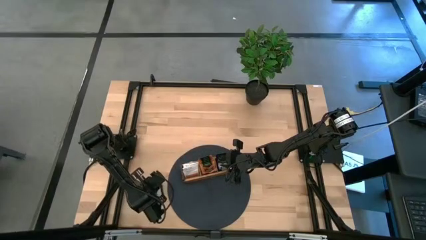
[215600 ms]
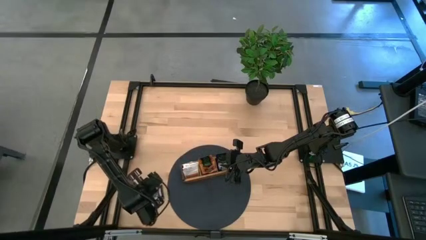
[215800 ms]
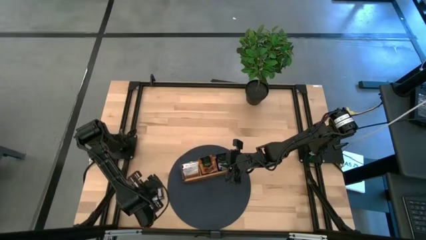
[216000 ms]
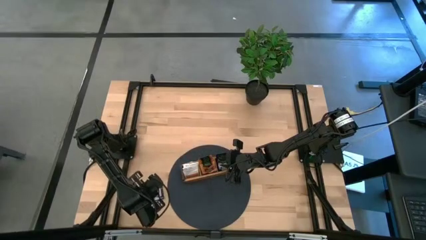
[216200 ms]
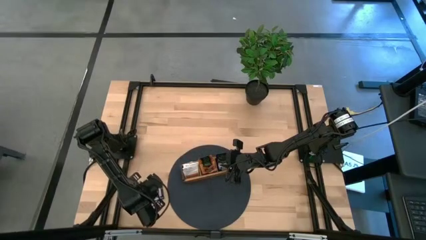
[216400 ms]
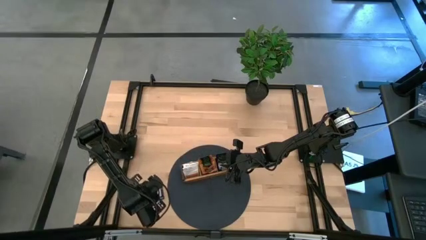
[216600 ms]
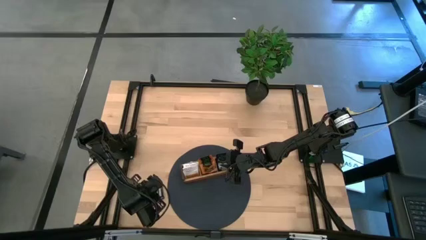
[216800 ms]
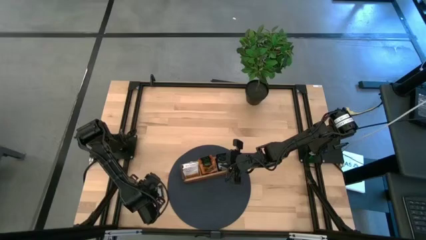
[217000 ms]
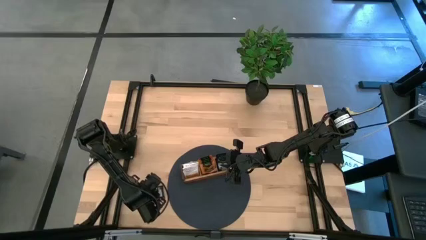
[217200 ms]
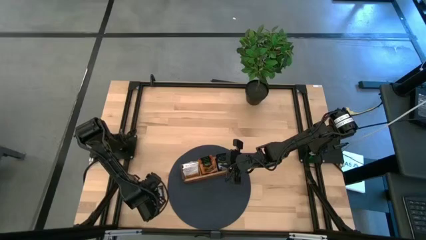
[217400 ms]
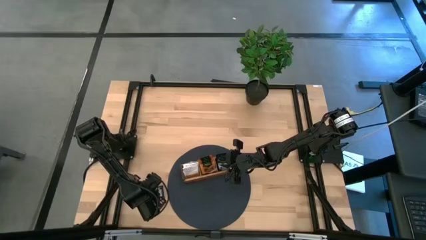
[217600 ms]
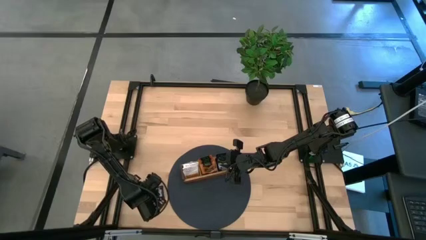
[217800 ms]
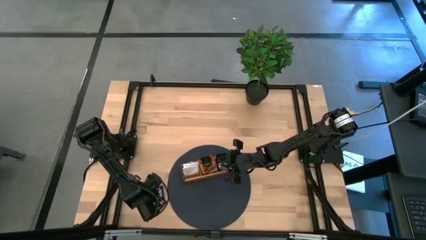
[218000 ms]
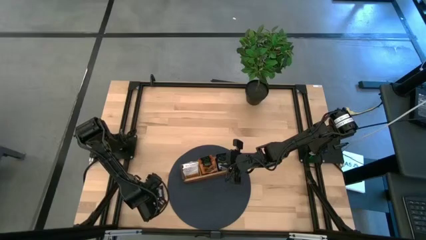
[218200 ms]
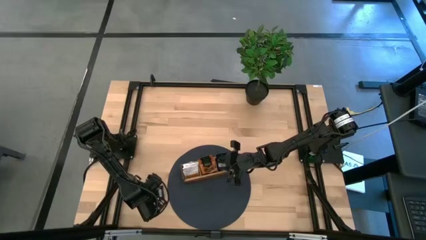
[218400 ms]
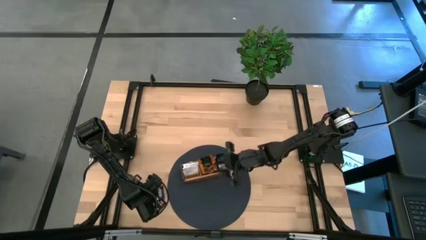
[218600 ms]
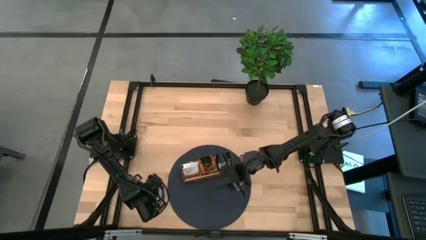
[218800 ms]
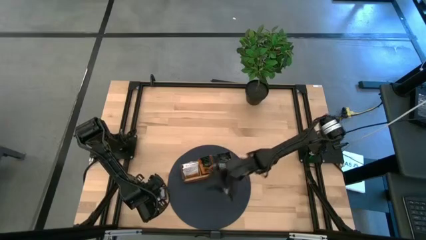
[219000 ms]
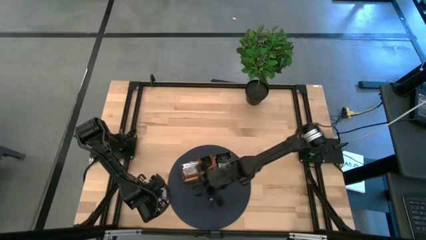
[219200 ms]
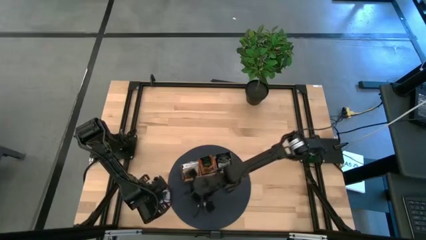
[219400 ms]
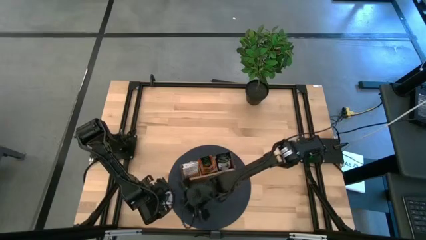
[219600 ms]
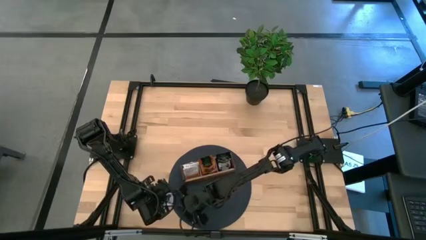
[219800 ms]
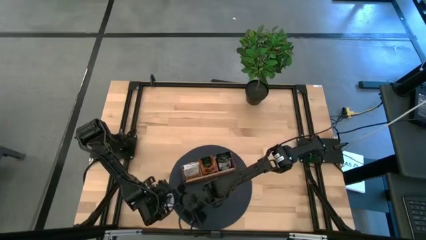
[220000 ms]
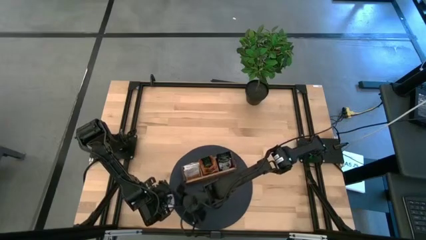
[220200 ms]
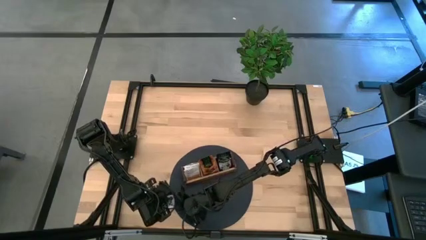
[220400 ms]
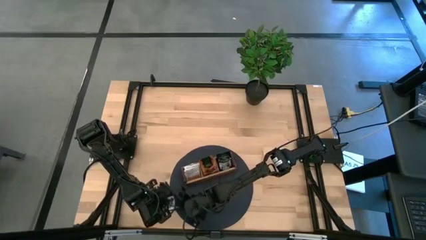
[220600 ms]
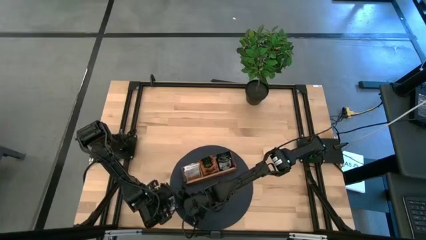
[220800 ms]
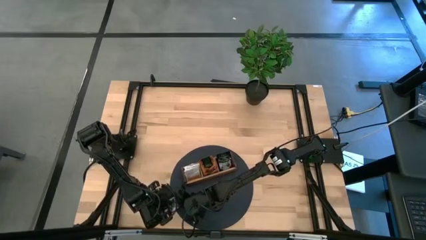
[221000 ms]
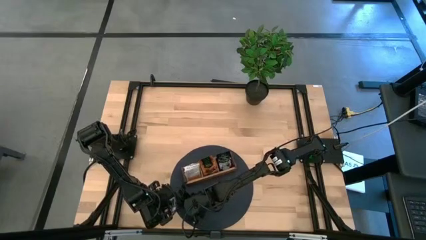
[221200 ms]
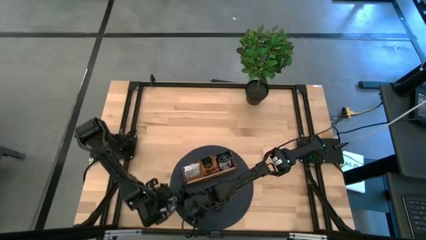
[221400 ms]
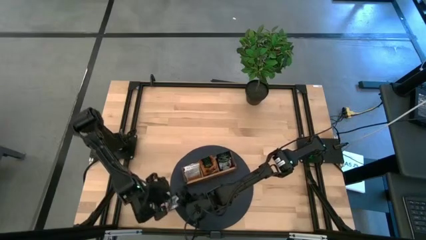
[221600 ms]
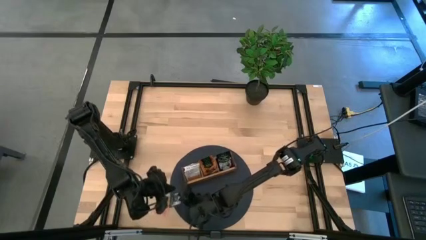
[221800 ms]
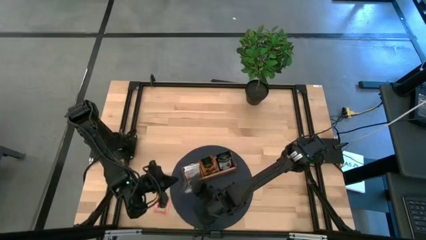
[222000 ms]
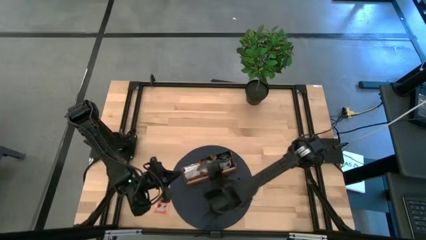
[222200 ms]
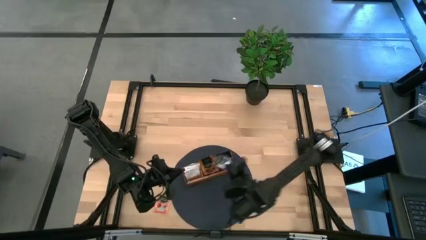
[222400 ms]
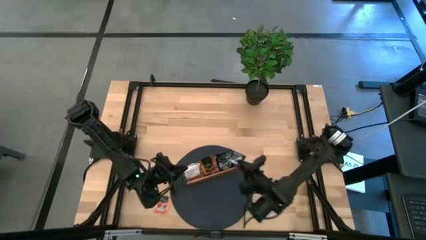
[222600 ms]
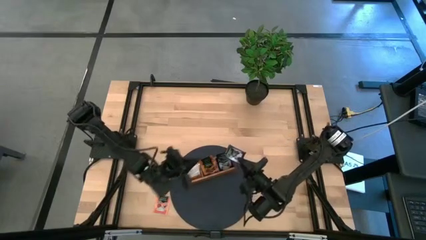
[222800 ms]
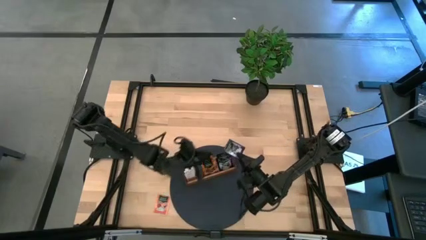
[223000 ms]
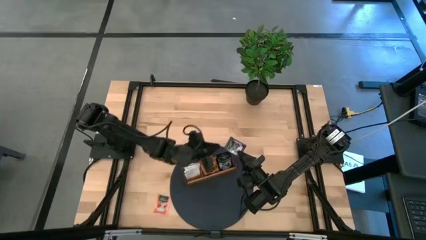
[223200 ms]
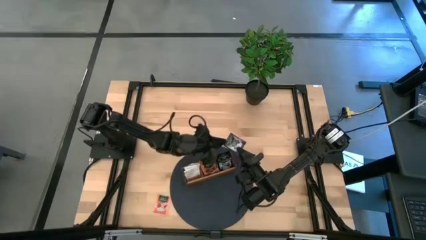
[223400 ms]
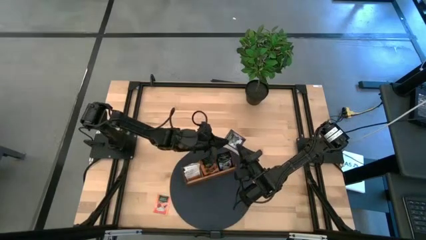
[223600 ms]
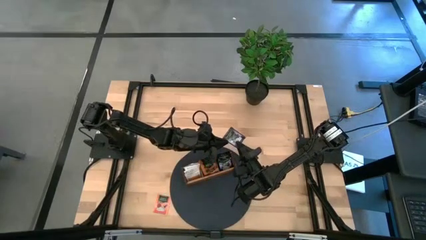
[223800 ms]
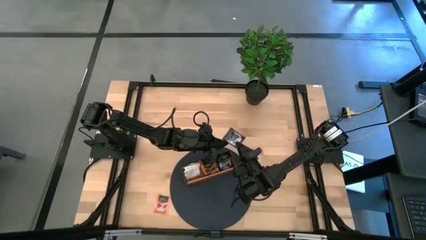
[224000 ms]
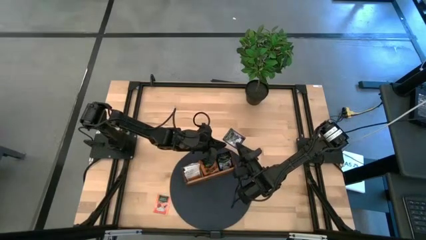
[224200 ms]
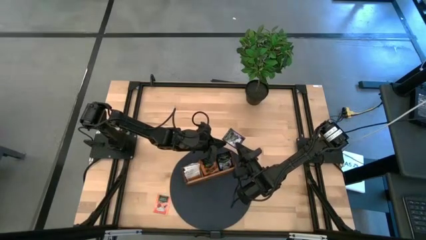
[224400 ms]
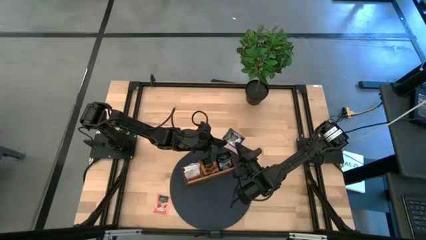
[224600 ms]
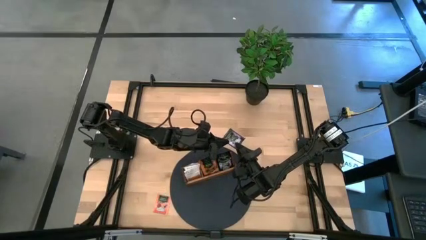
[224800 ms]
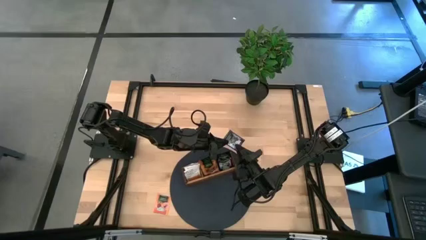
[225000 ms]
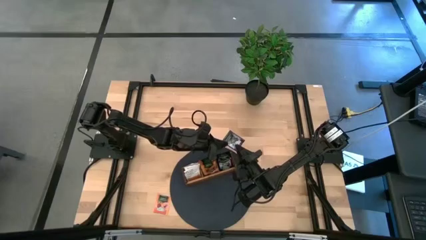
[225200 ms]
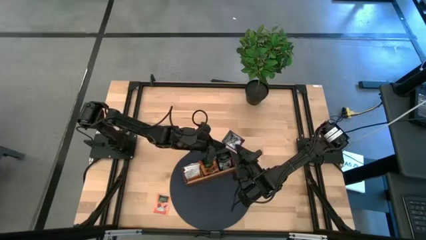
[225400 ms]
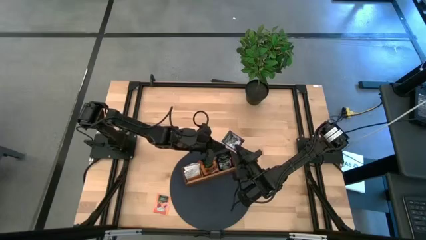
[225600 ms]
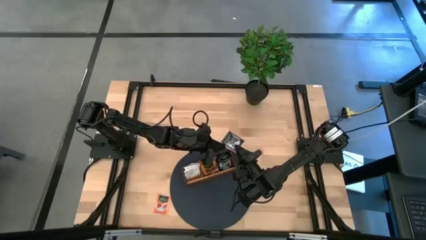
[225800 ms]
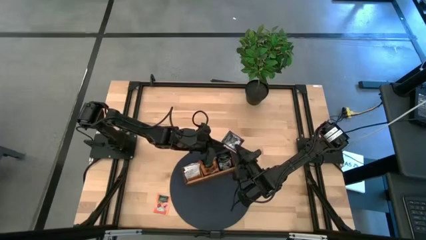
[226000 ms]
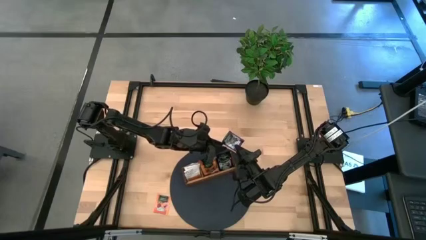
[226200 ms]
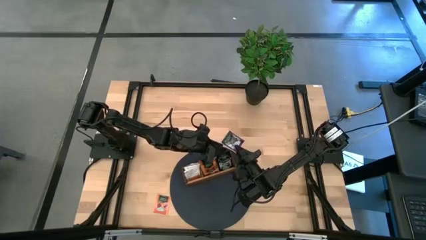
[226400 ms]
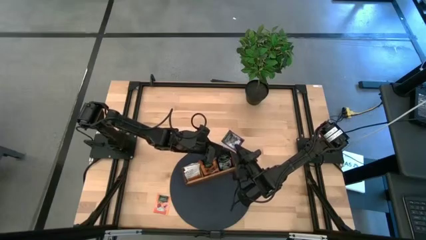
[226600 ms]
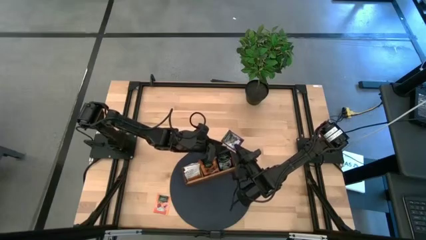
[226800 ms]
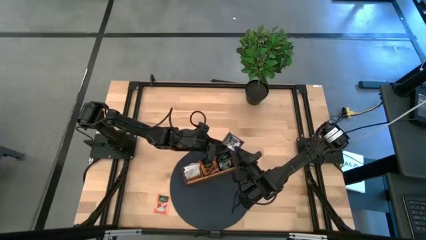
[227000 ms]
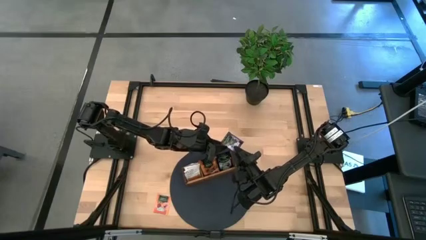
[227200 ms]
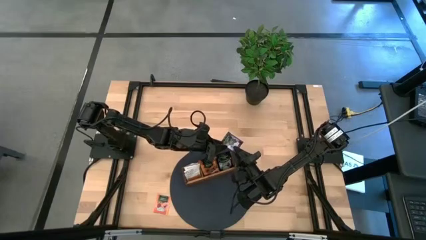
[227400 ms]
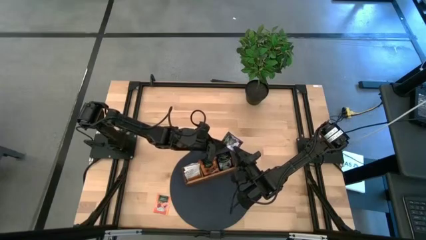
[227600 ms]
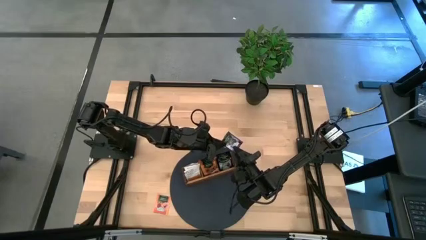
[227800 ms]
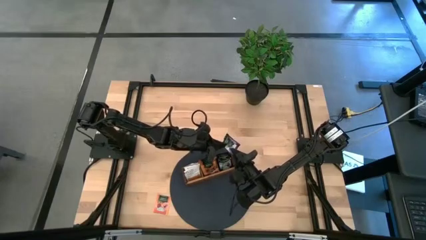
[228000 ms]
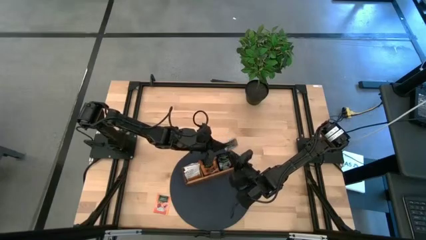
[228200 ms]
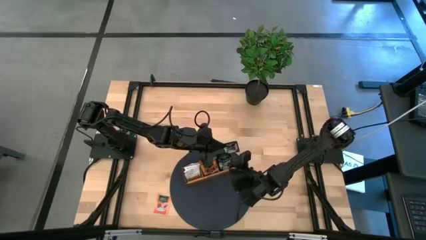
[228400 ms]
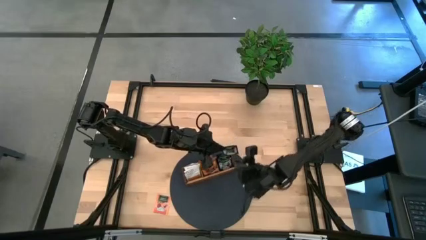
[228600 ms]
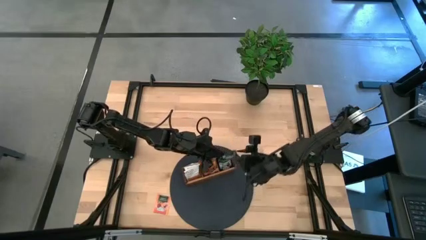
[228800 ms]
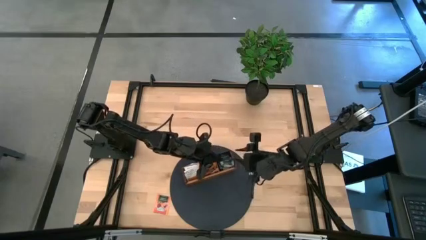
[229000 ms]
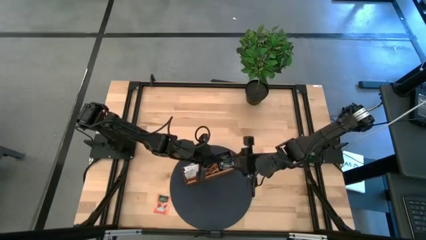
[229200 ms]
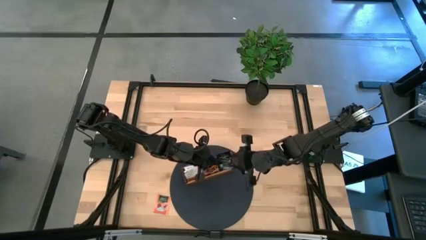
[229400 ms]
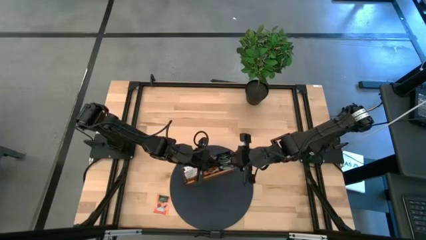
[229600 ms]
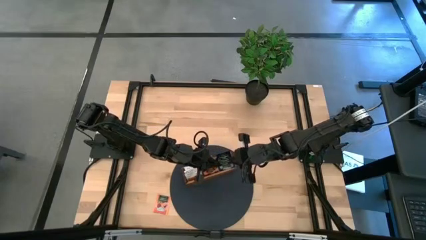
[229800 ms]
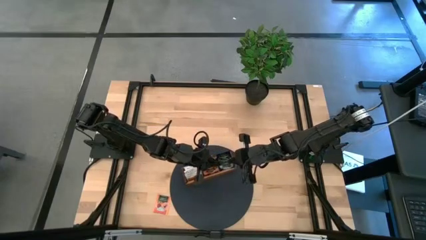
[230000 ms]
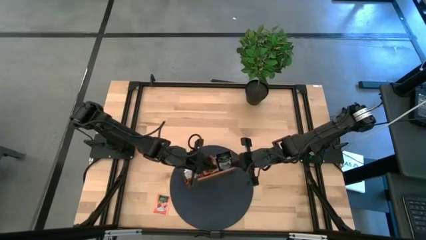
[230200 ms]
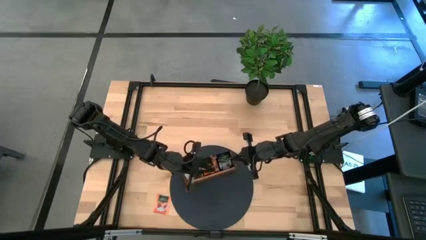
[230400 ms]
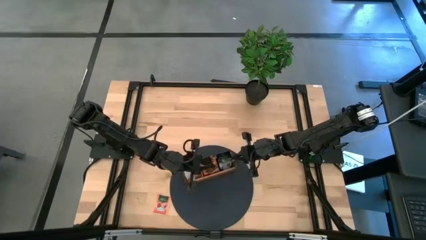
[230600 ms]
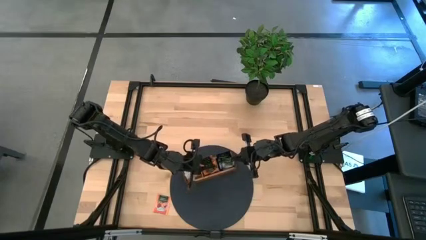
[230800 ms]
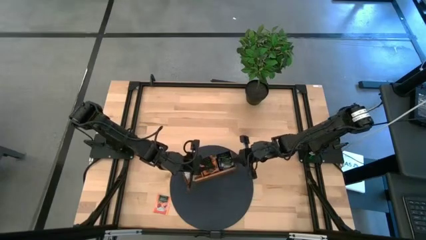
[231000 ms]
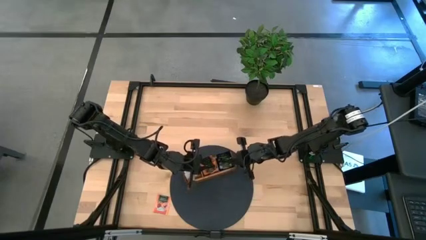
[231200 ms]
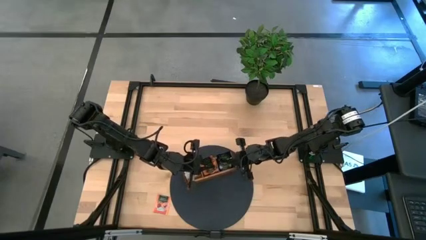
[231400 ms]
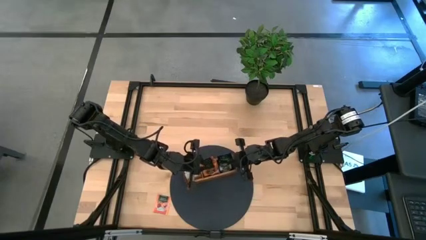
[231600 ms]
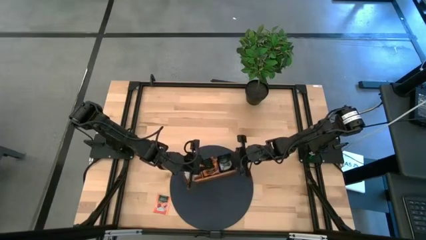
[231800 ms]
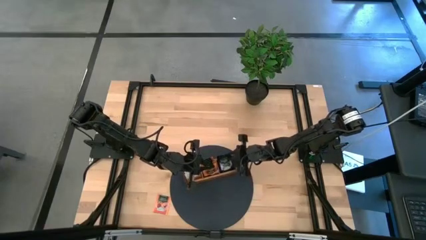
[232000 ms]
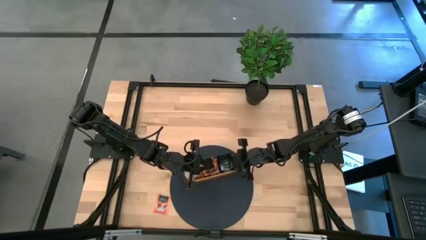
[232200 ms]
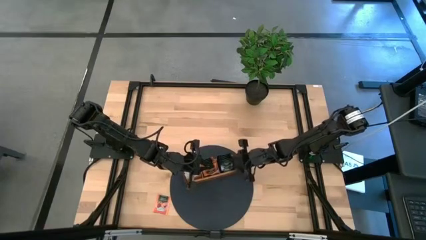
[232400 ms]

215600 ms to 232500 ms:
Task: Pick & Place Tea
Put the black white tea bag into the right section of the wooden organizer
